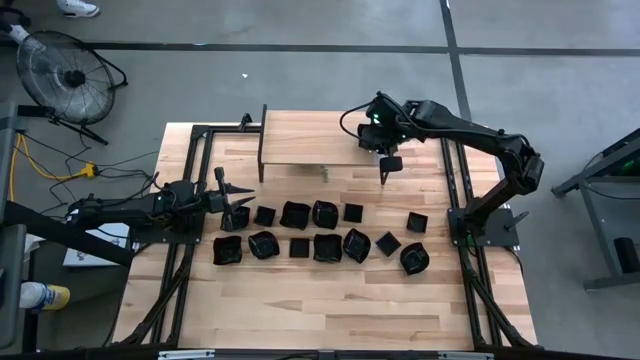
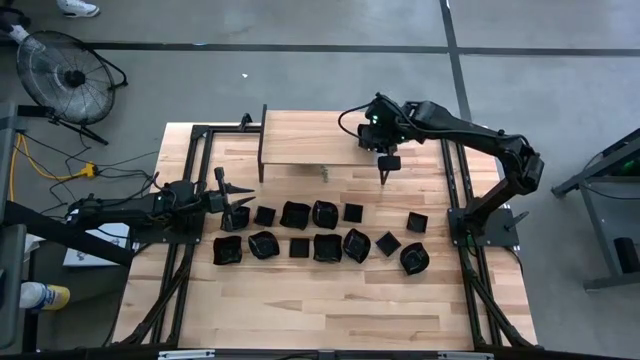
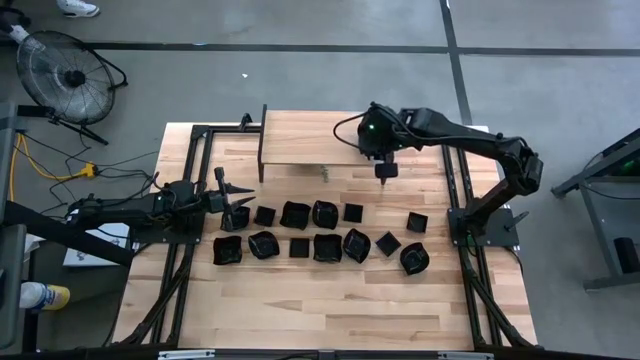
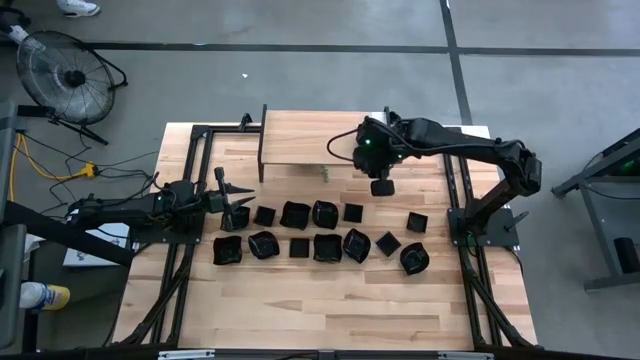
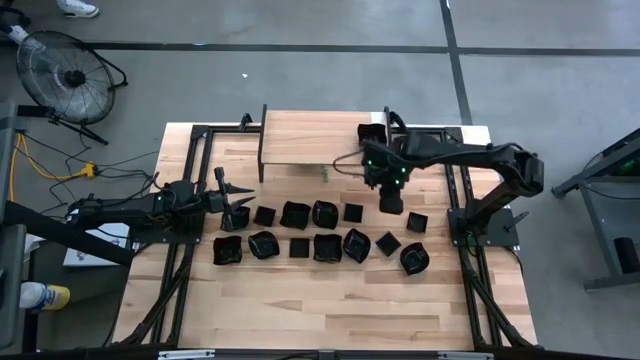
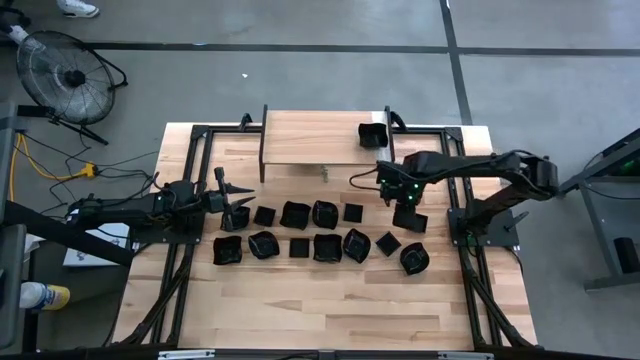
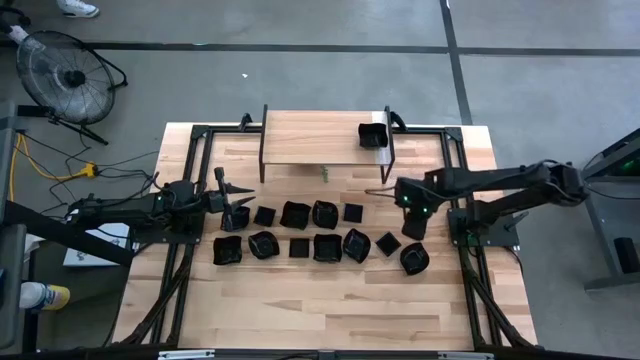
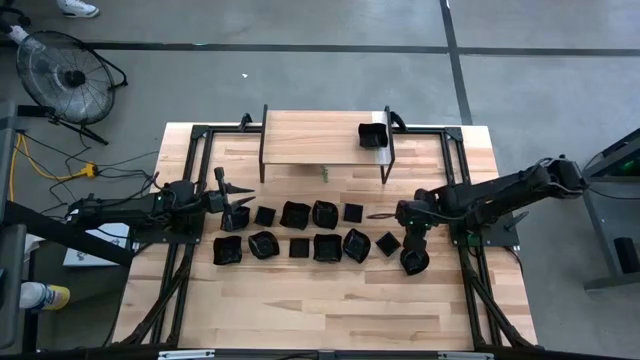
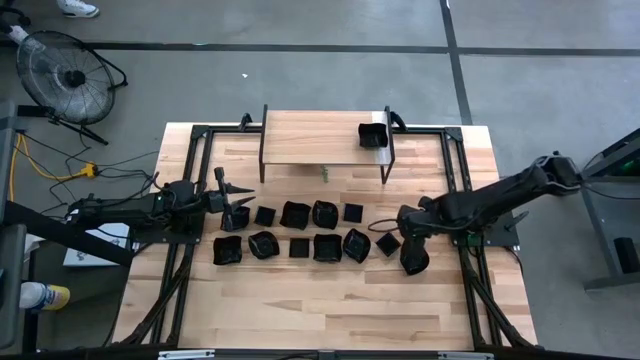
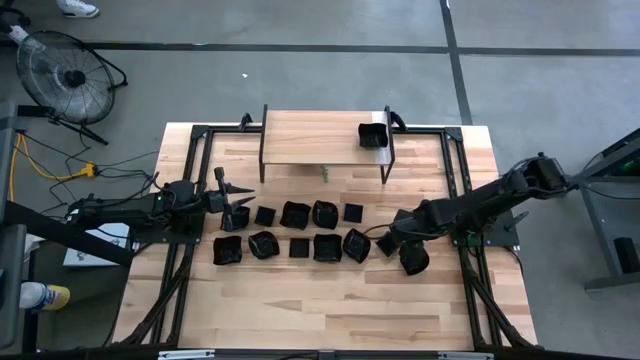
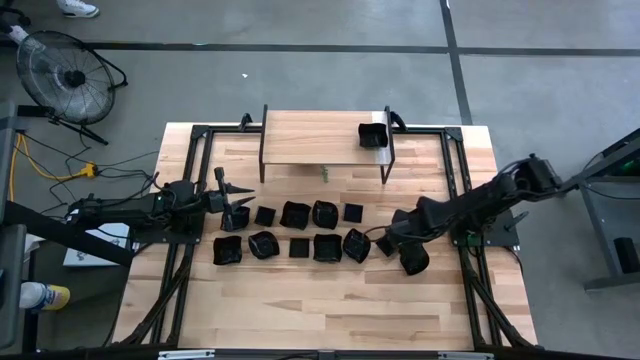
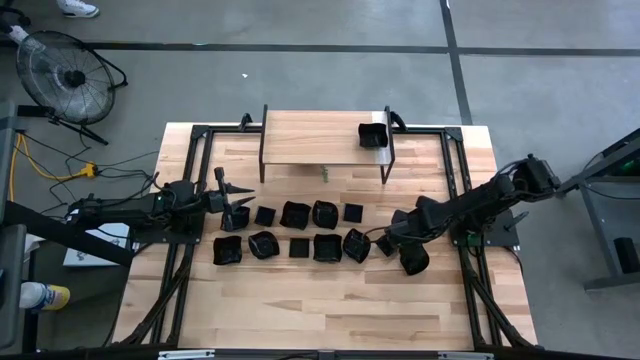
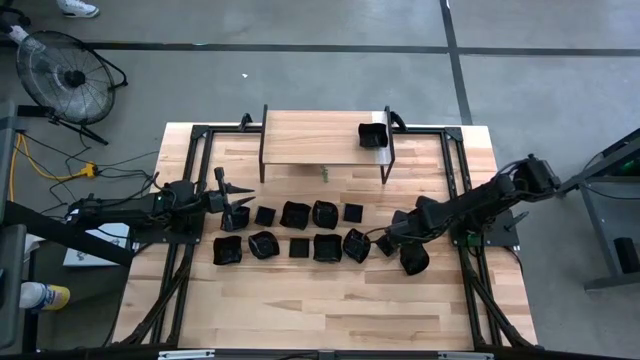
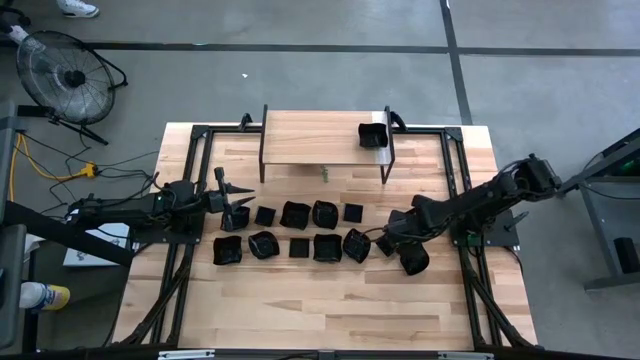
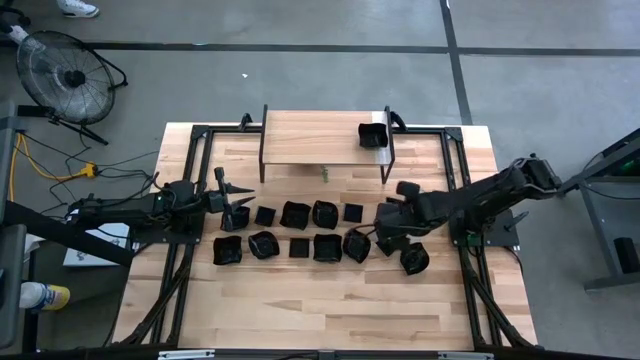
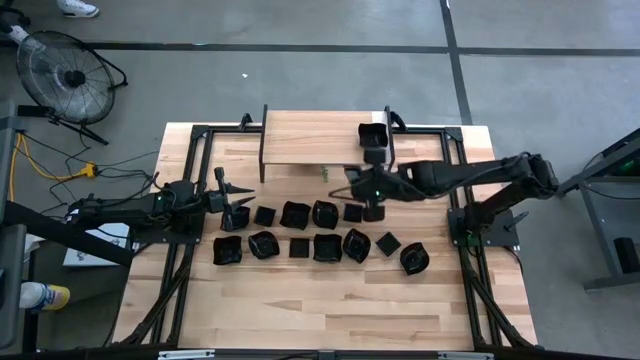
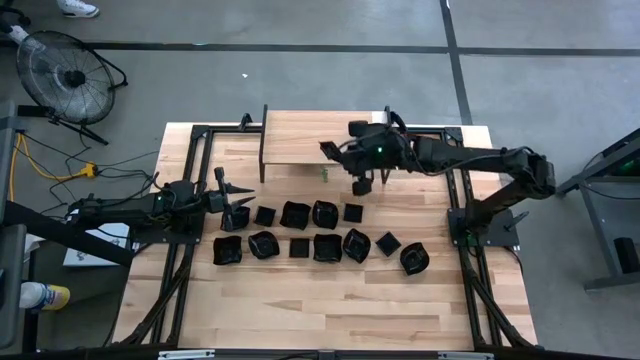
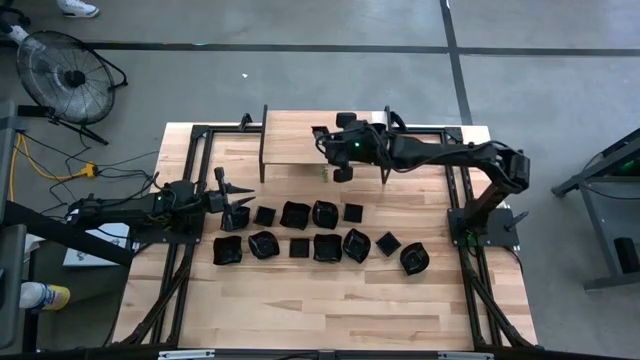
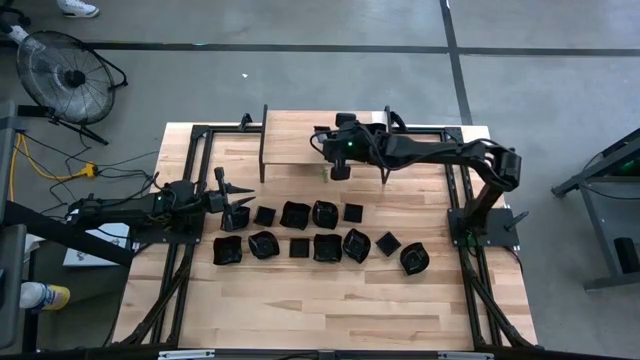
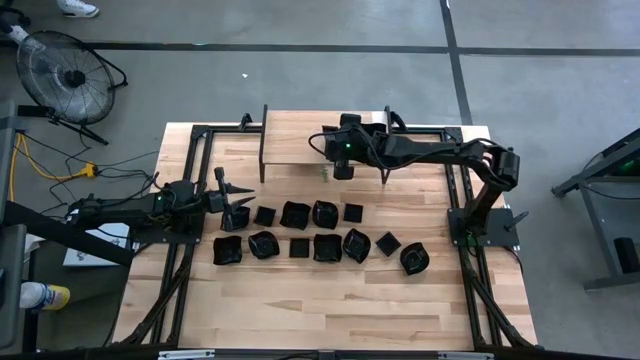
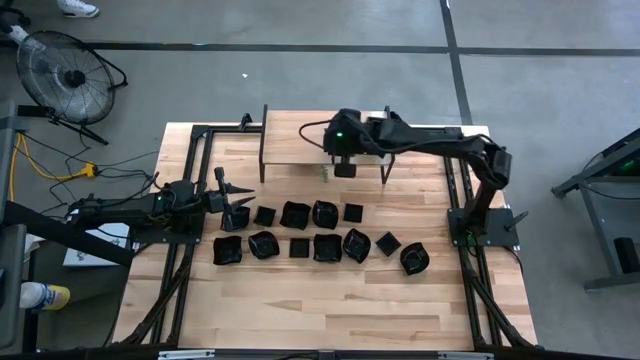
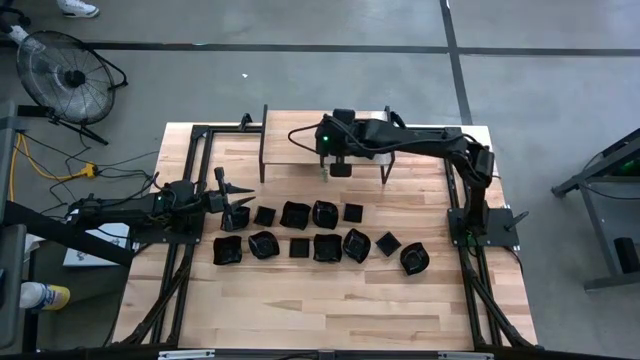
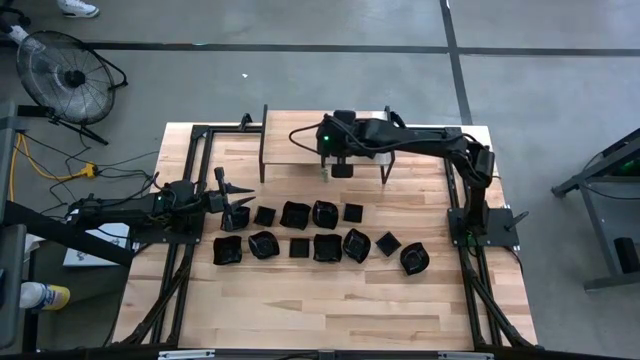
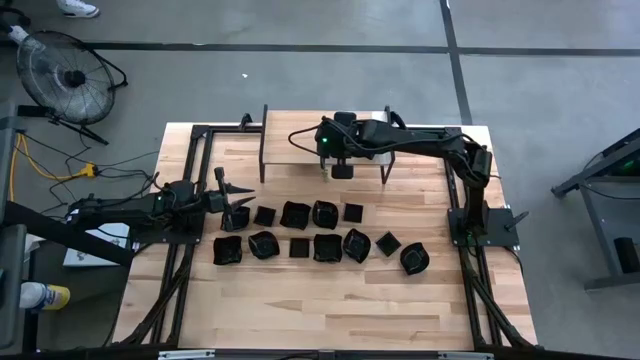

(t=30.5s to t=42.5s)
Task: Pick & Place Mini shaped plates
Put the square plate on the shelf

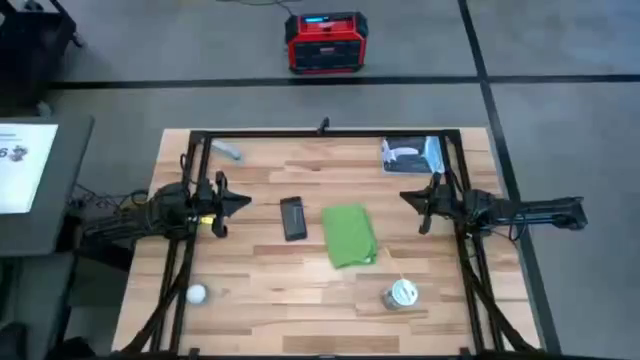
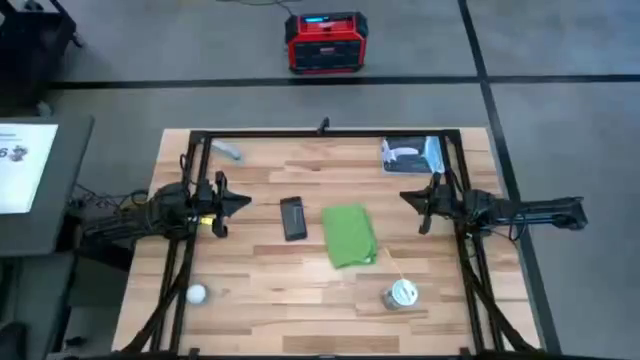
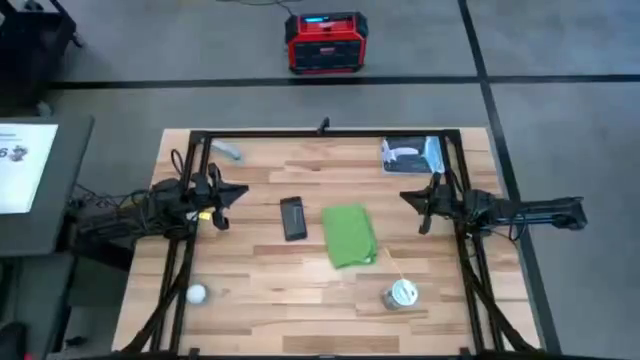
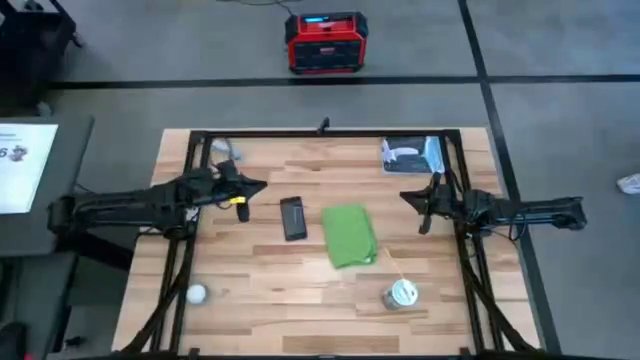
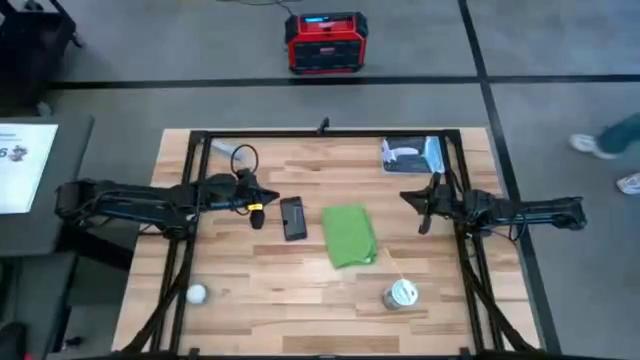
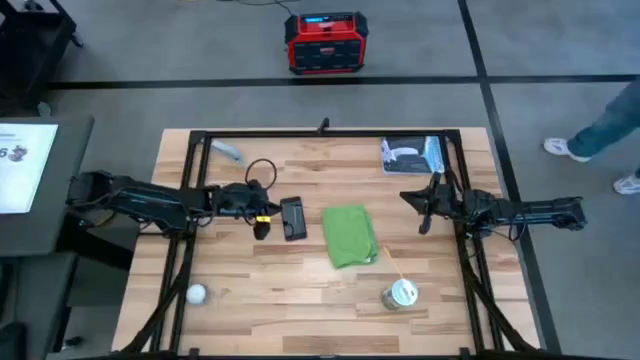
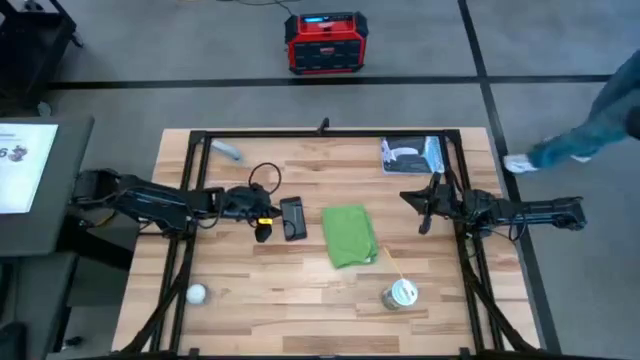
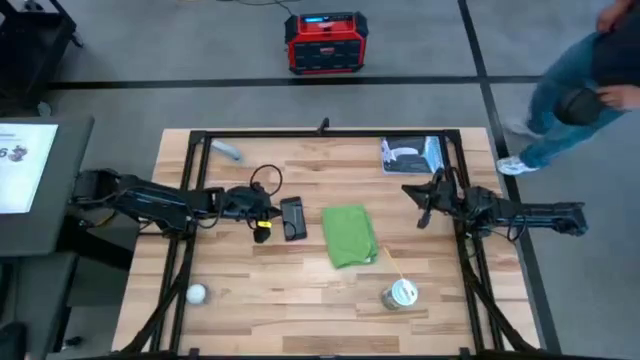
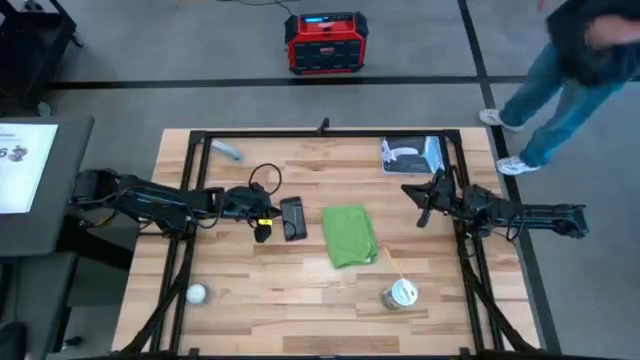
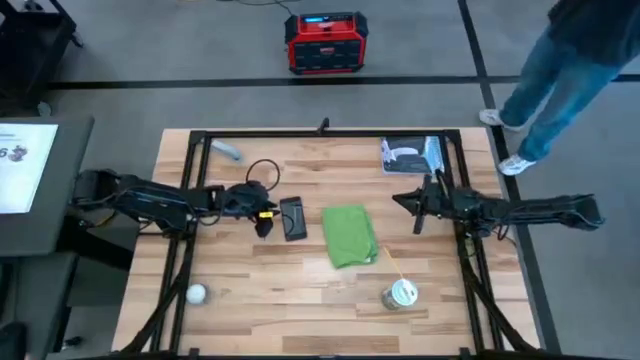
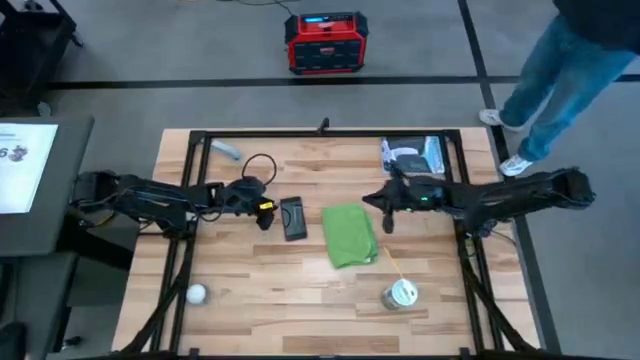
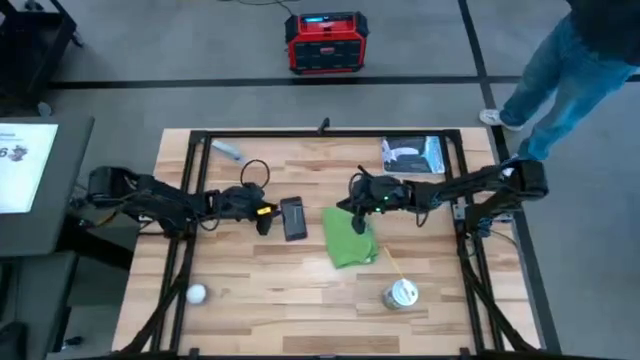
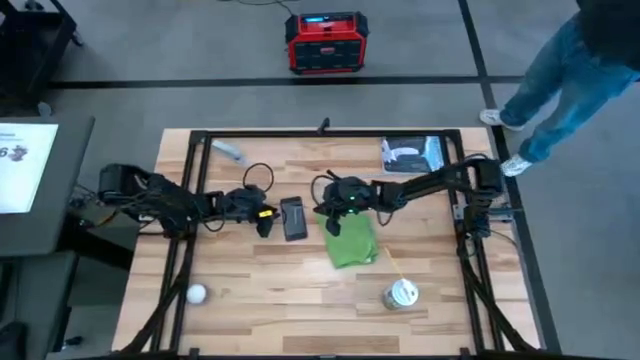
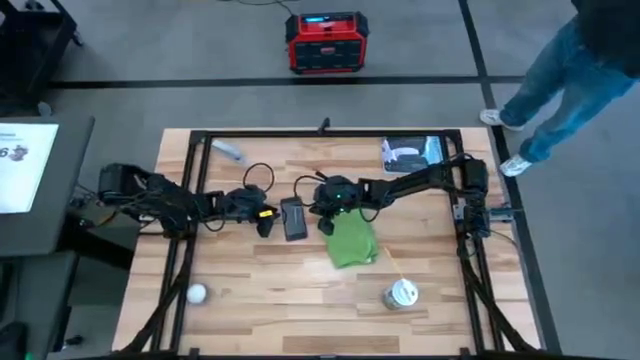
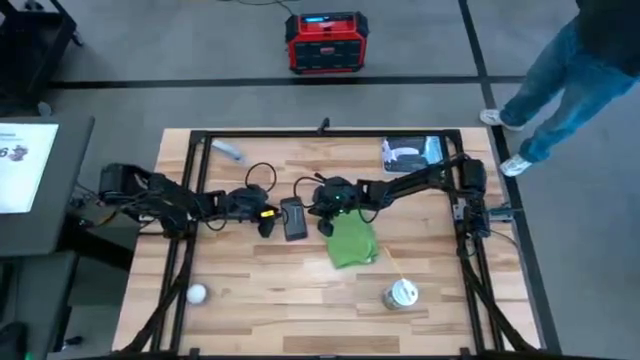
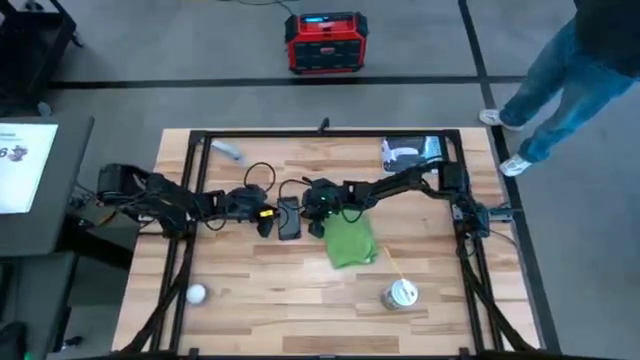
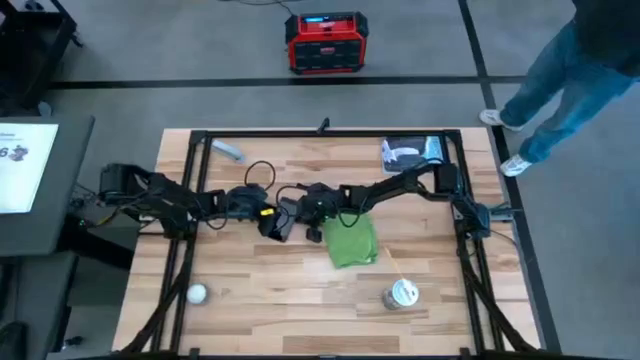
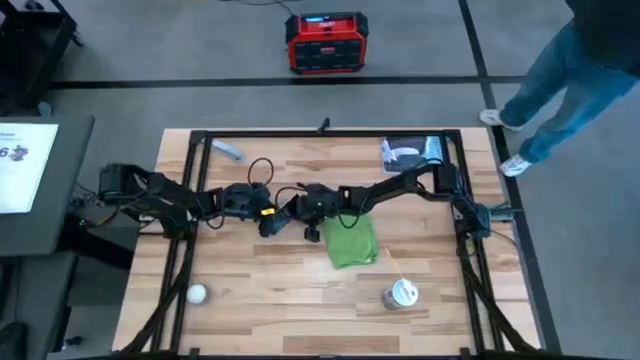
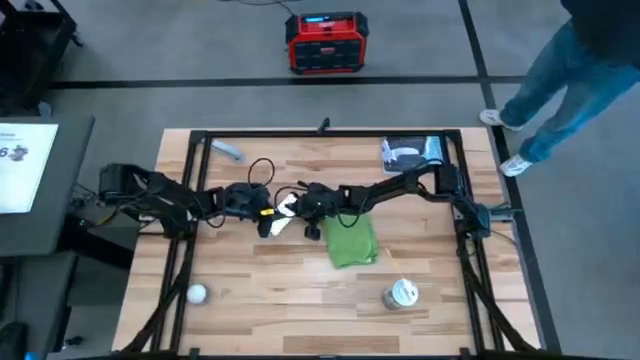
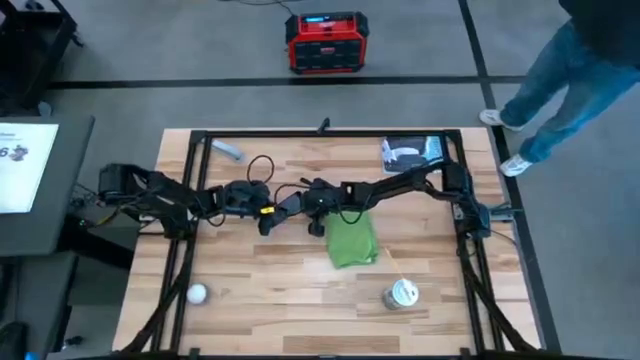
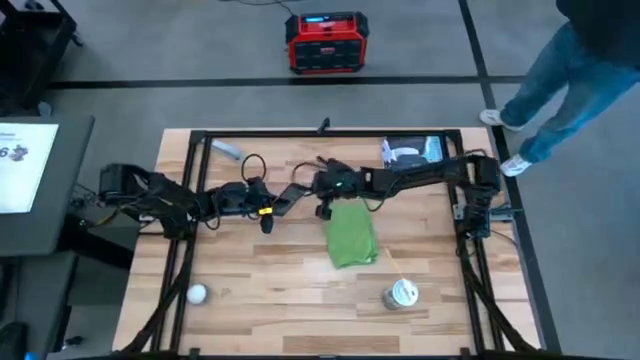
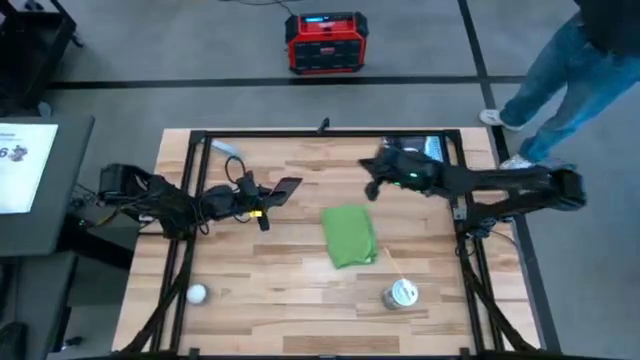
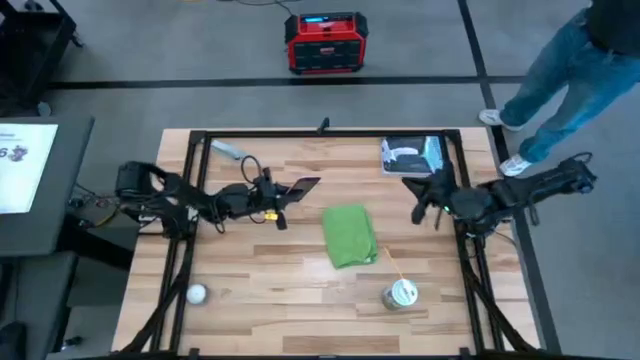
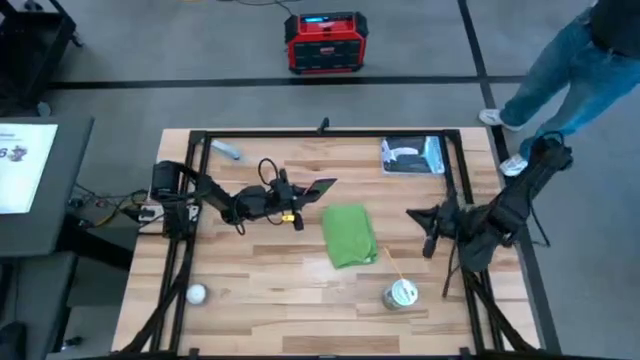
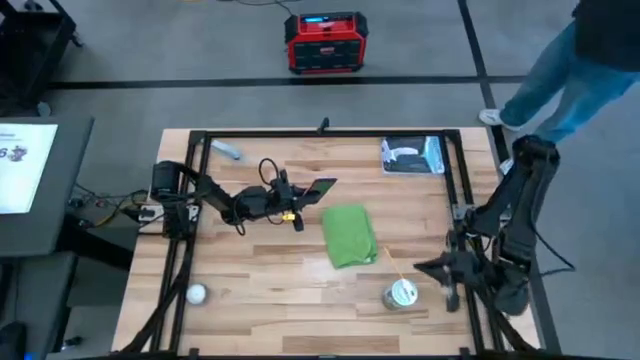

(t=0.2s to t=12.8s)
Task: Apply microfiber cloth
Spray the cellphone using the cleaning bottle
